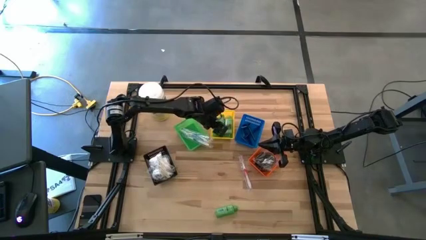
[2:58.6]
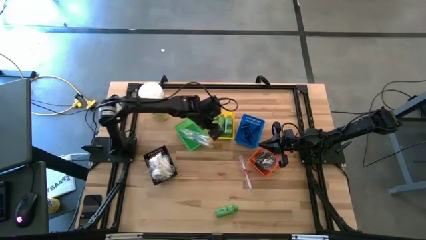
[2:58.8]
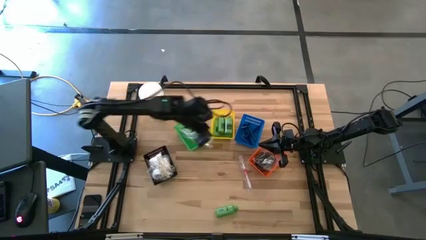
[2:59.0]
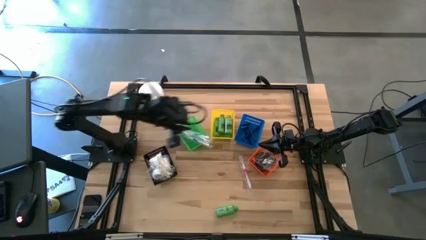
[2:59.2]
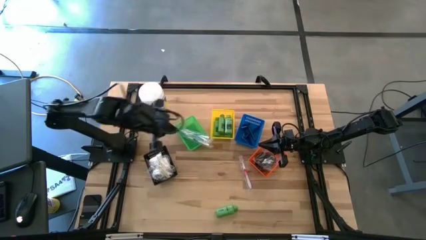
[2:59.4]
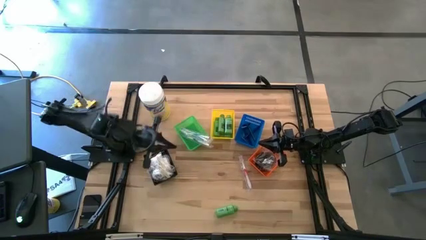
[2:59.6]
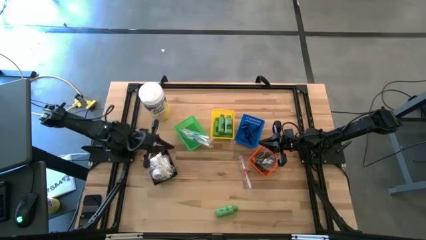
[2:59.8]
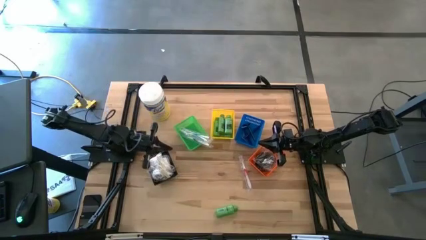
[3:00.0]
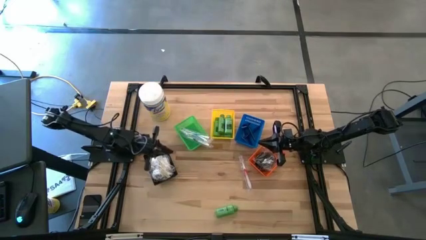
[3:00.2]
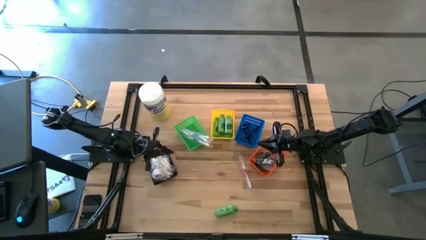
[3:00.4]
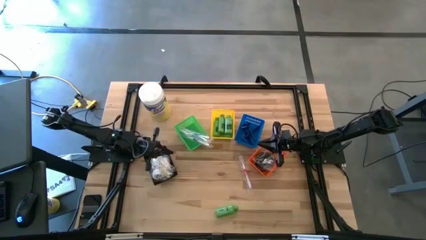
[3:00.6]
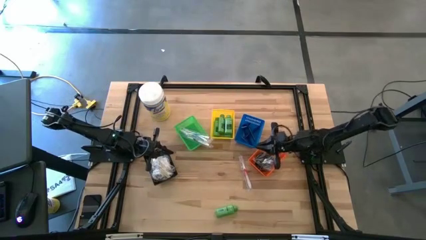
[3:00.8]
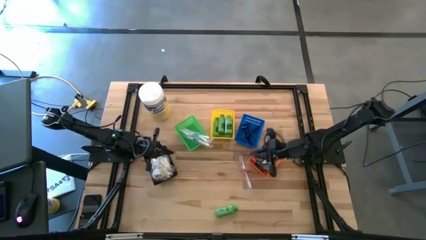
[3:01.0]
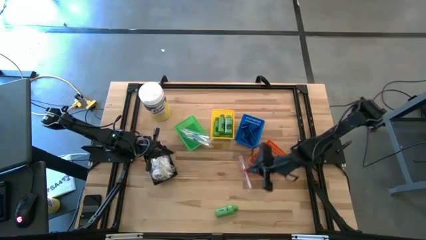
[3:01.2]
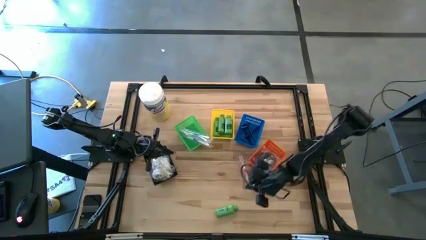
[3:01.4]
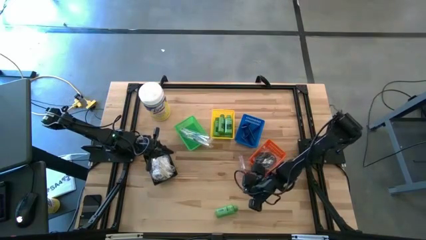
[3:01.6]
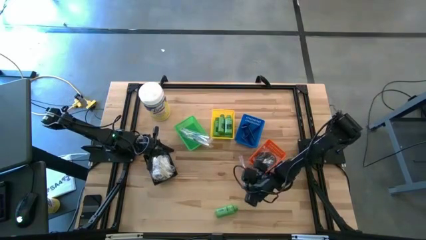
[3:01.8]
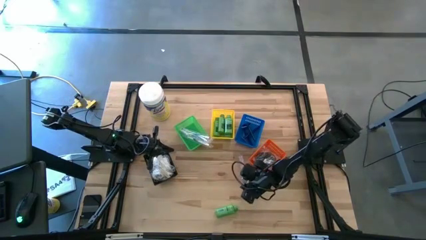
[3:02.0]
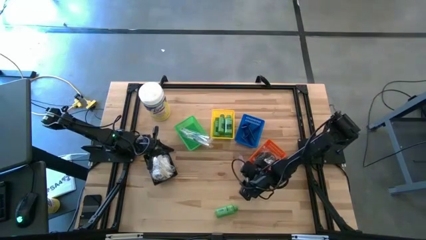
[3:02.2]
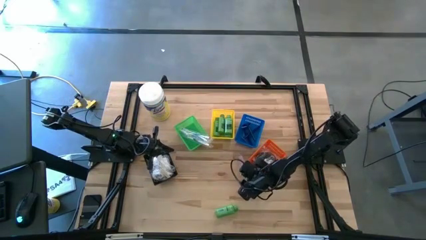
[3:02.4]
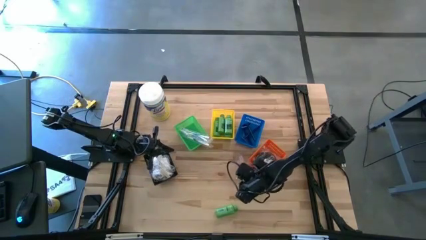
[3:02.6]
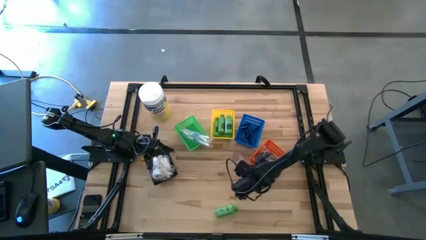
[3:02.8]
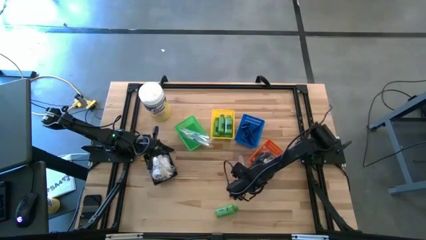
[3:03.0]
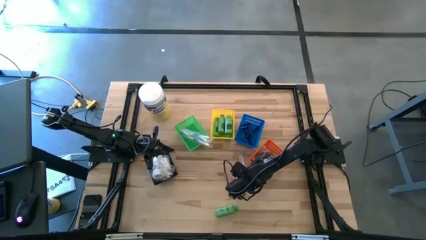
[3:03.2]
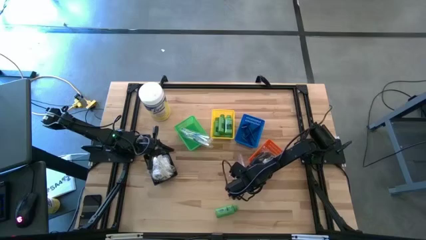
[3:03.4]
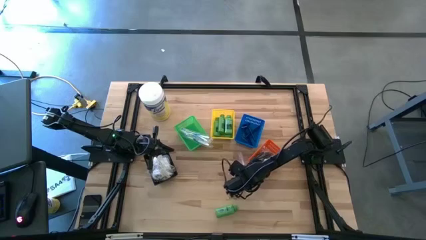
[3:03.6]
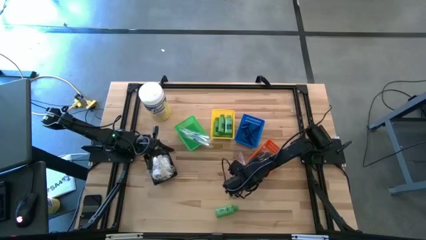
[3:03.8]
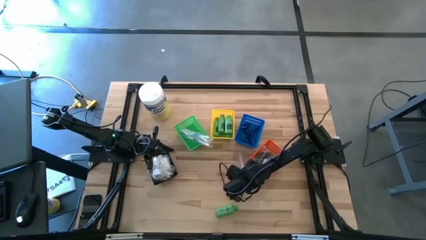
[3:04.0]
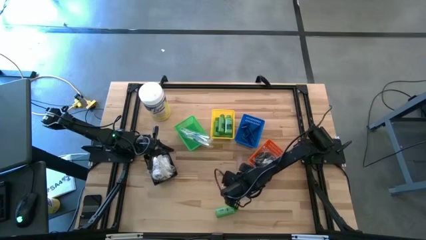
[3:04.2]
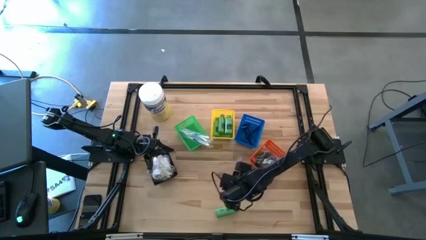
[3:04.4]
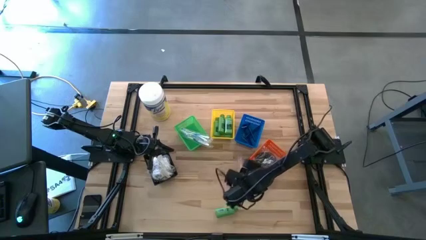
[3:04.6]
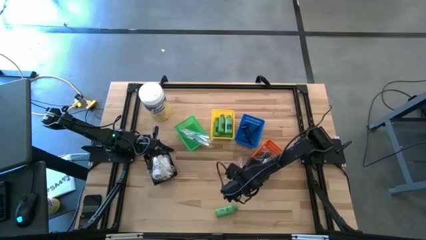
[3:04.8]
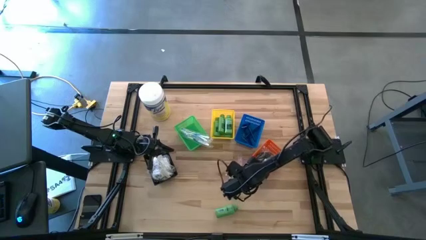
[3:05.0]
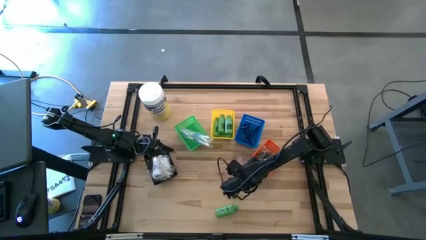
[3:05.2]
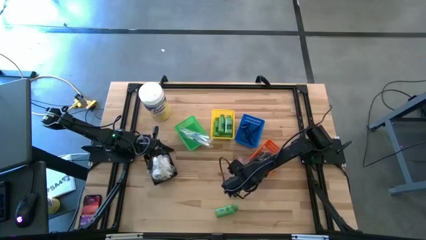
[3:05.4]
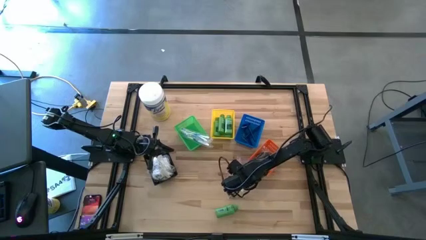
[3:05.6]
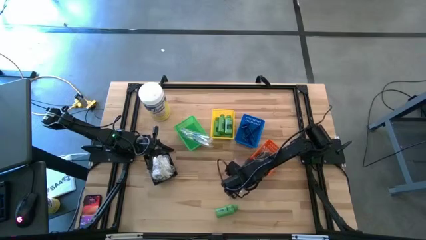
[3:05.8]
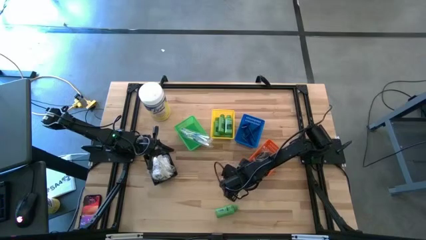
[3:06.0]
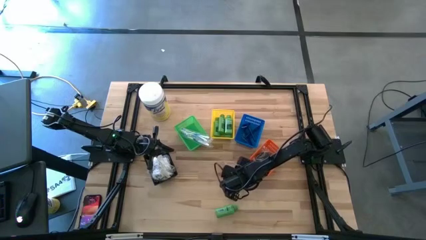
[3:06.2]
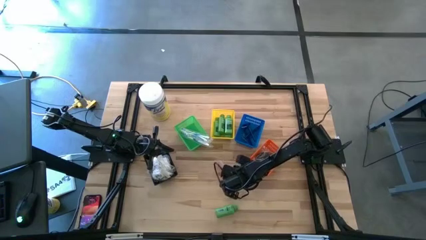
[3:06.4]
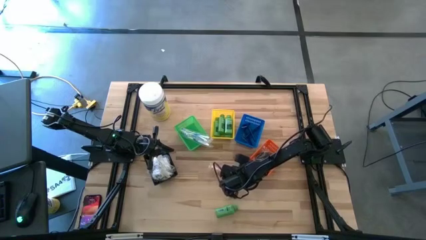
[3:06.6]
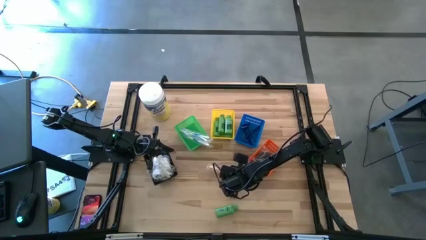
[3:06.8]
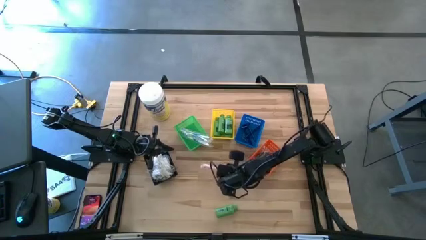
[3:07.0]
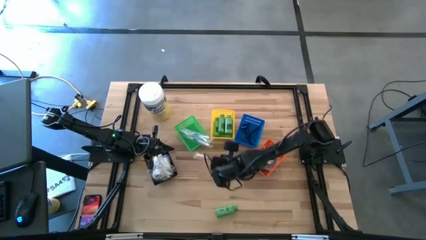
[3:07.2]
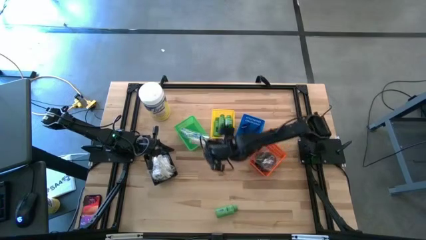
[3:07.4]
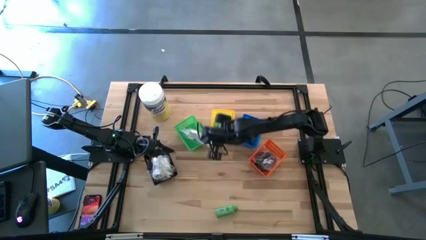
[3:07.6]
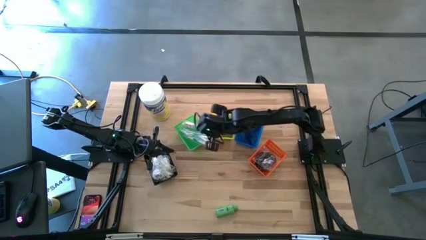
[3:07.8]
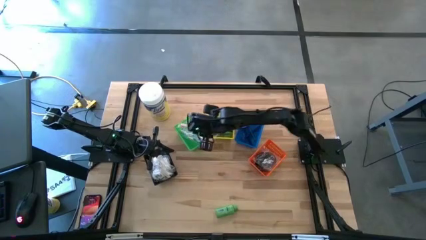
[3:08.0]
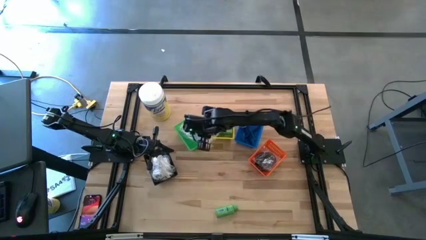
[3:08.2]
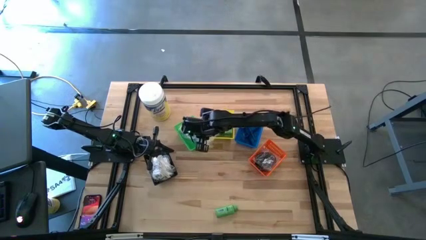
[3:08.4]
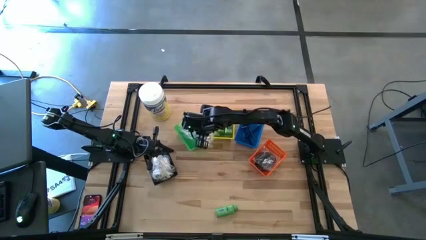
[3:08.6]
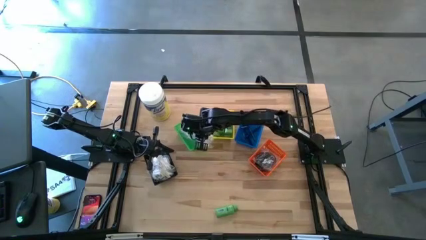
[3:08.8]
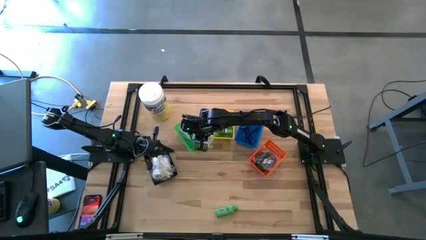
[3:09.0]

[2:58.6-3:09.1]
Task: Pick & Place Travel size toiletries
Put the orange toothbrush into the green bin
